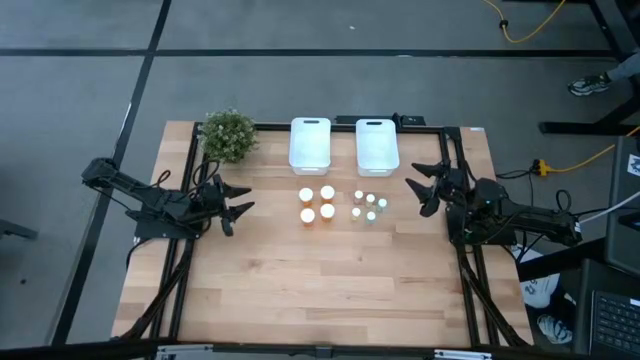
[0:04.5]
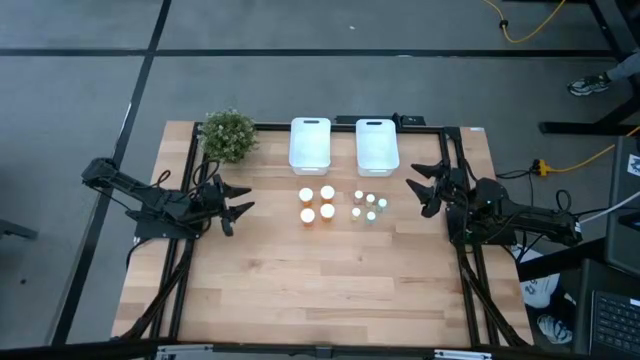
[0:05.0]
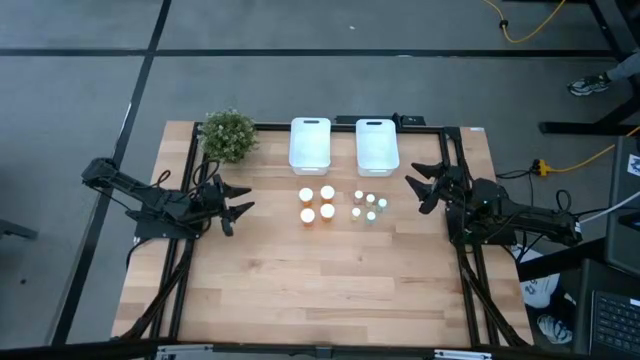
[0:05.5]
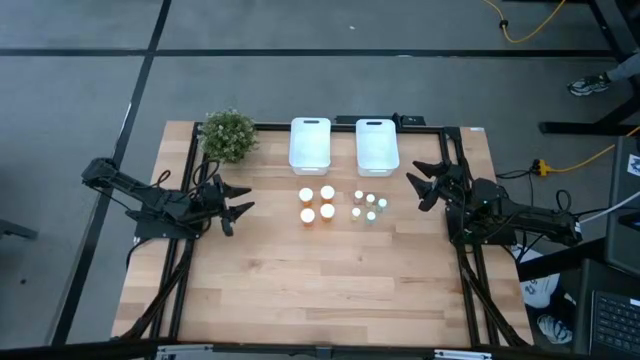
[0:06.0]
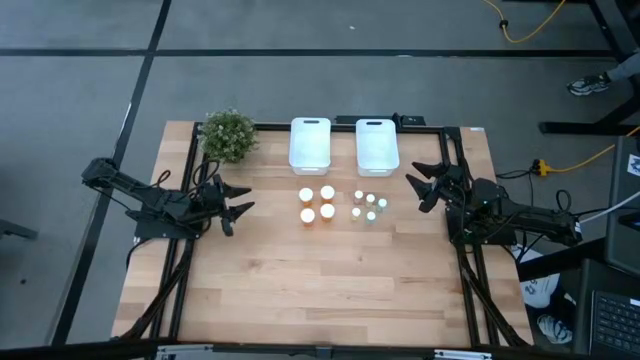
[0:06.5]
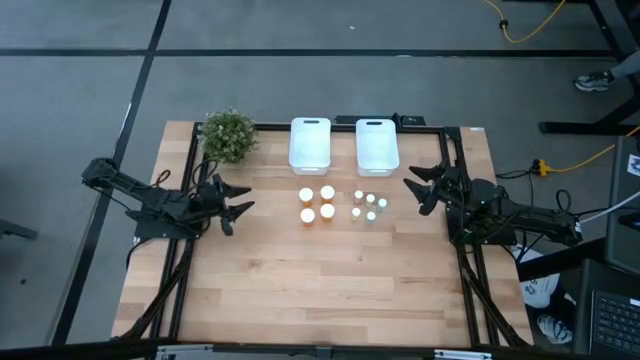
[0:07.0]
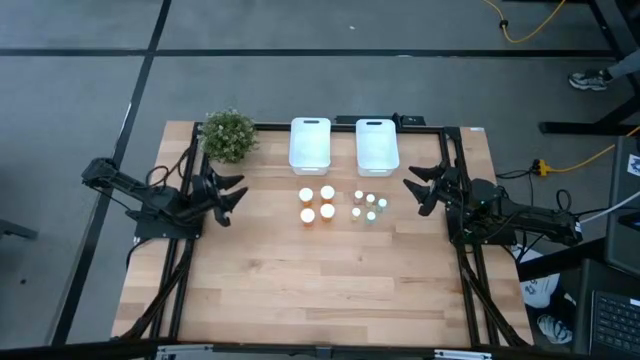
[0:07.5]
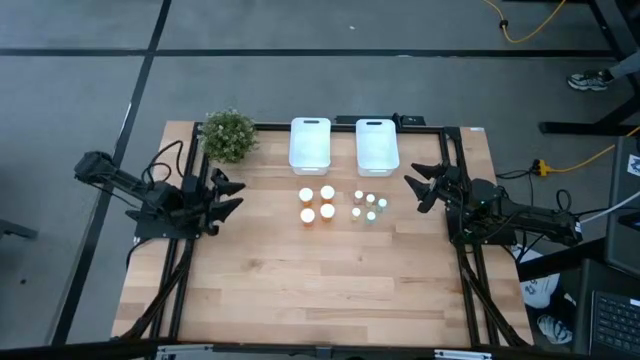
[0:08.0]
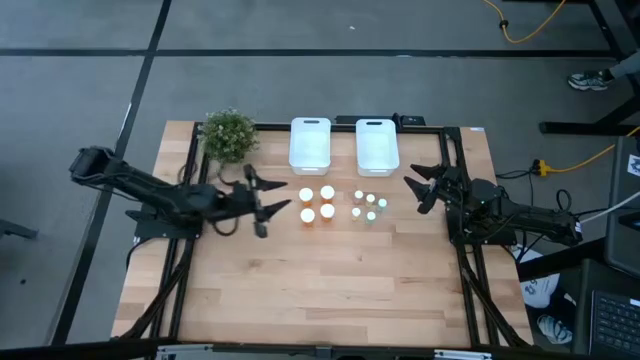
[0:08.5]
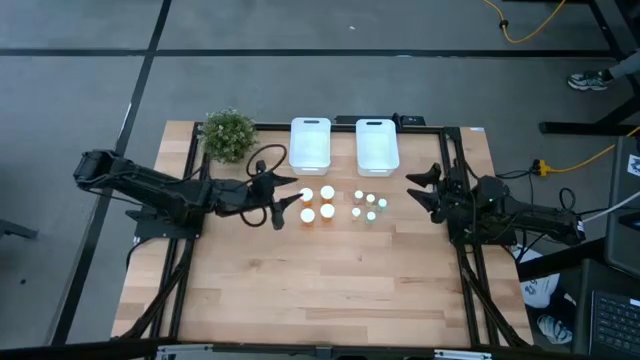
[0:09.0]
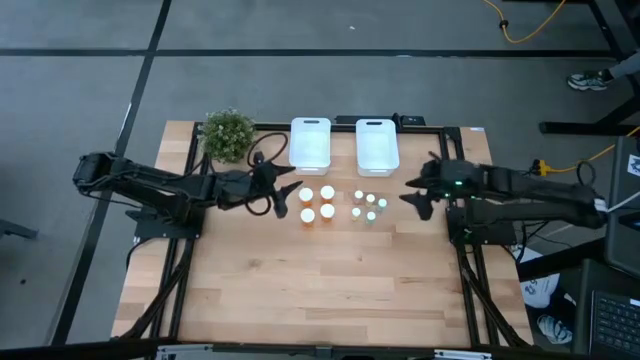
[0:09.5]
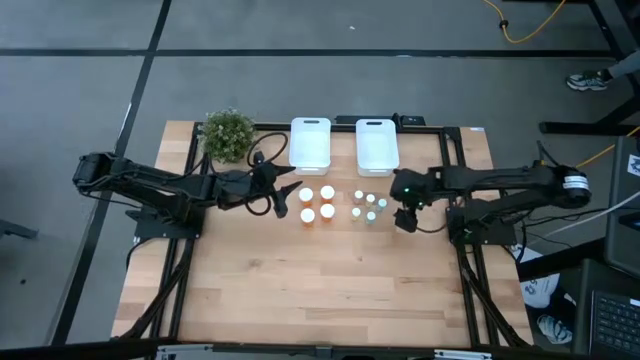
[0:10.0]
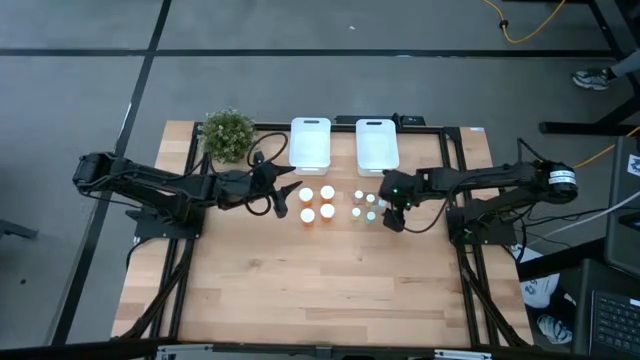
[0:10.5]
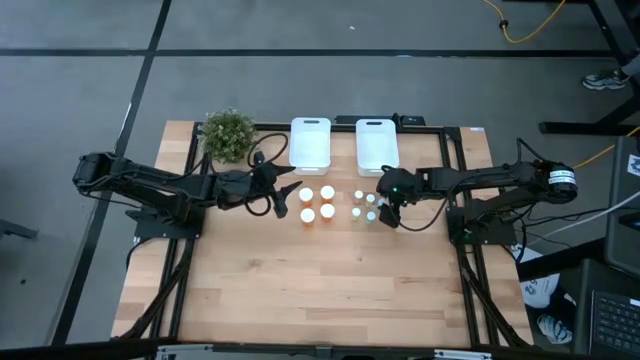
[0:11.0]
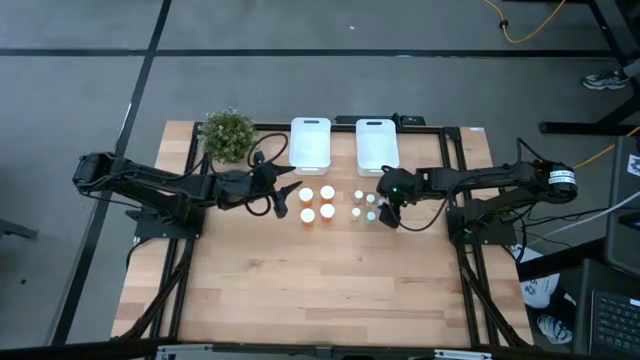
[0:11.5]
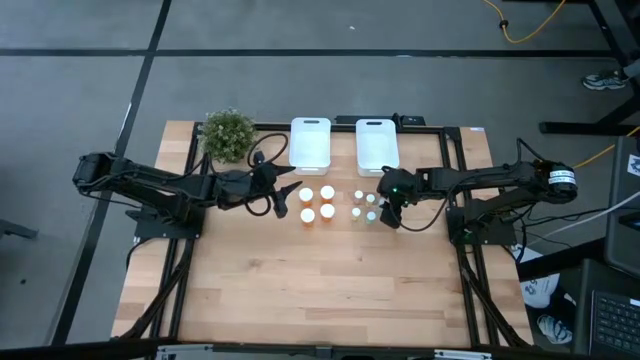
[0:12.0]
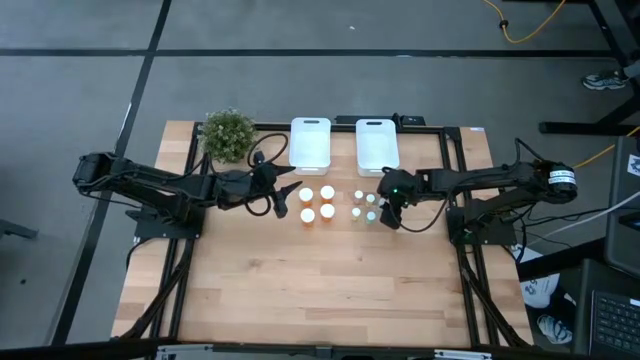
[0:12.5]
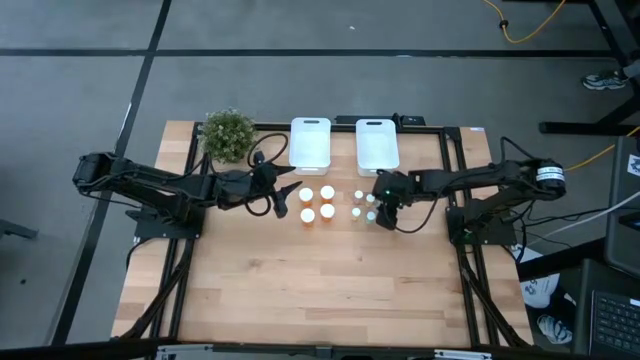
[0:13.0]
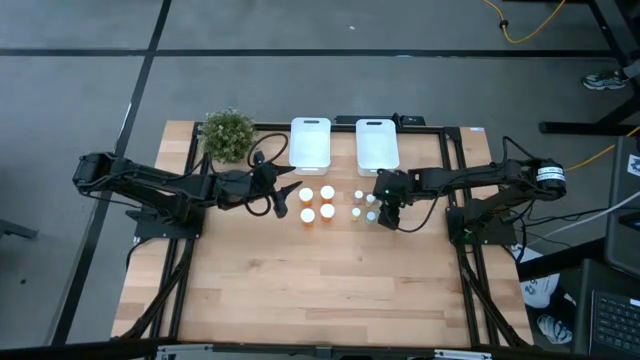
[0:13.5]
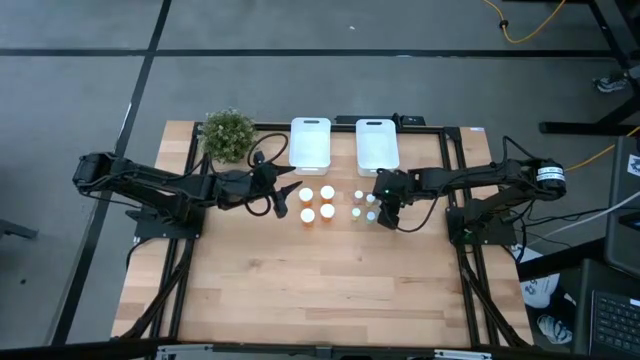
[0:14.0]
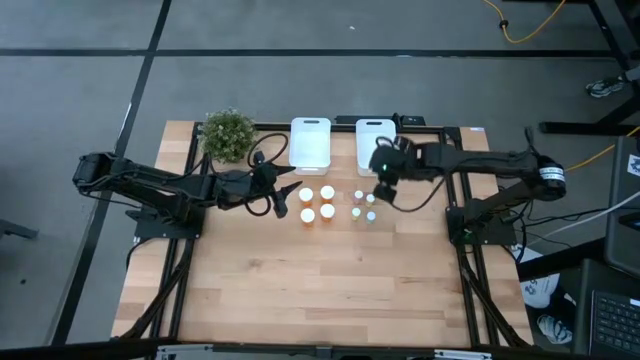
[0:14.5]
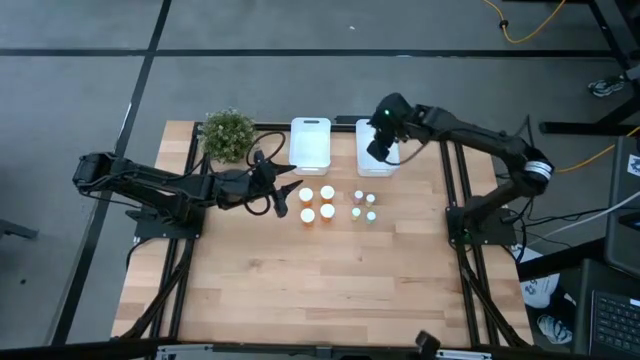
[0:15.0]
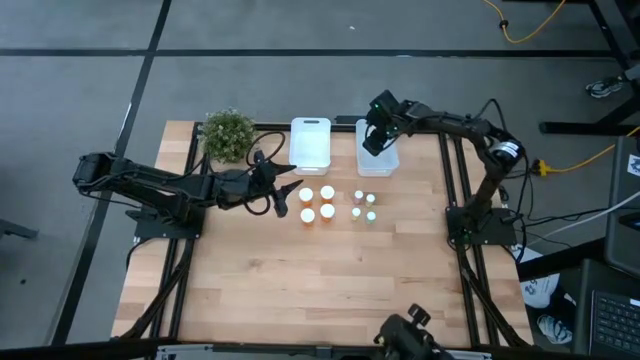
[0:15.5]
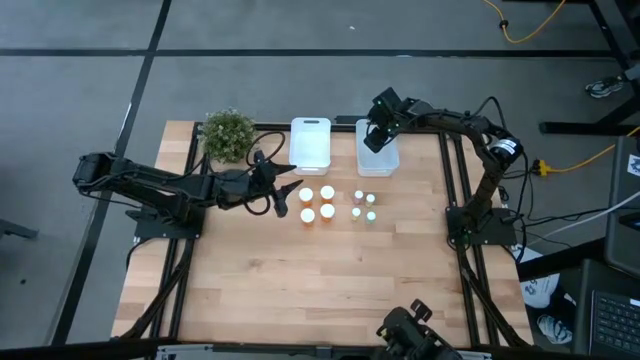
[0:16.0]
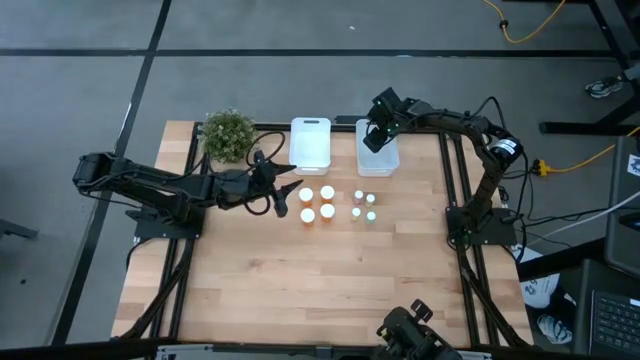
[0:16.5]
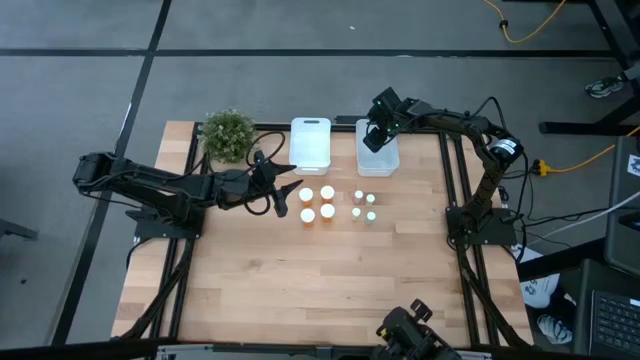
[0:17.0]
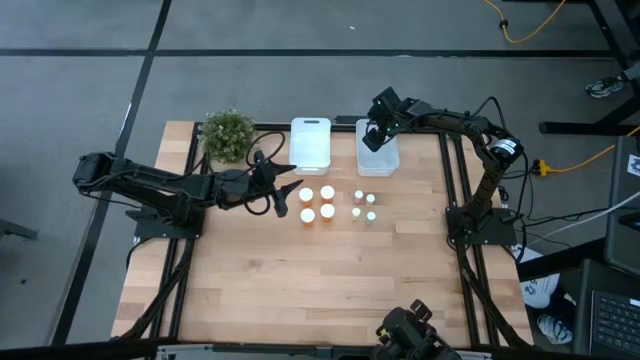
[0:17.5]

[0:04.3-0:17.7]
Task: Pick and place medicine bottles into bin by pill shape (circle, oval)
Put the blue pill bottle into the right white bin

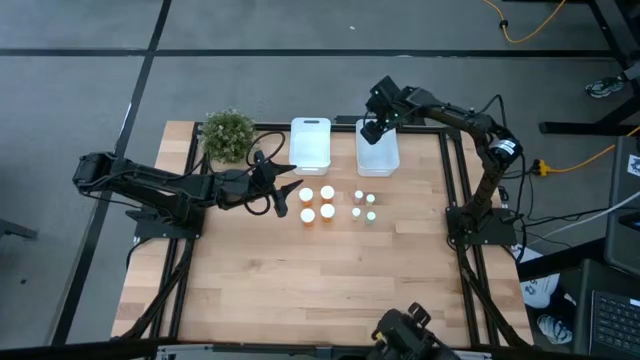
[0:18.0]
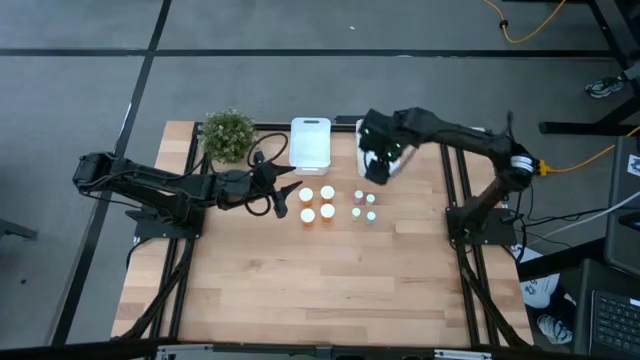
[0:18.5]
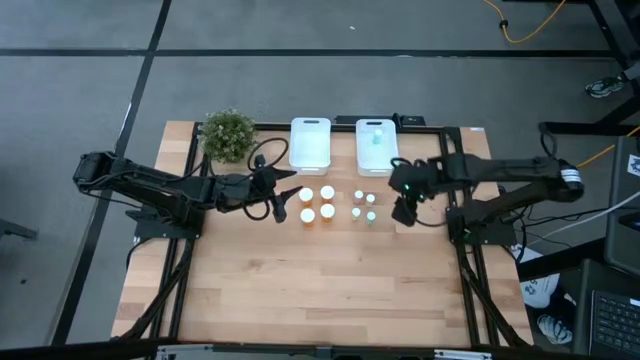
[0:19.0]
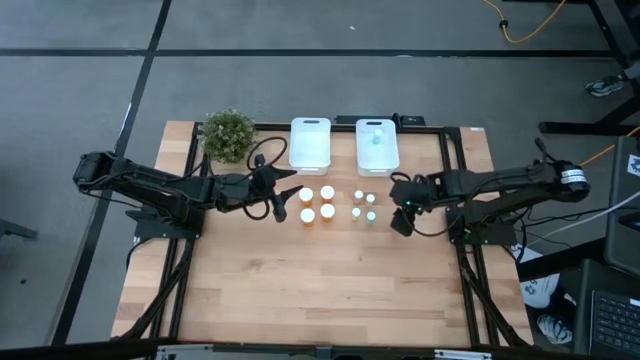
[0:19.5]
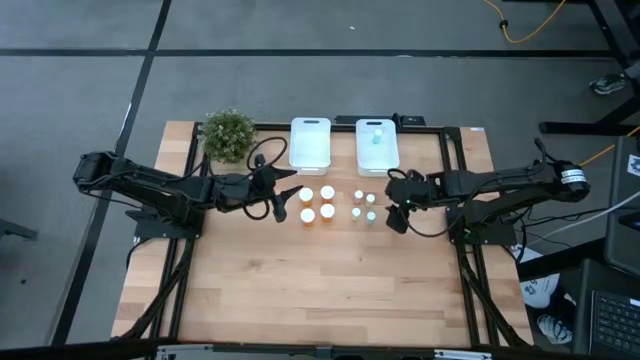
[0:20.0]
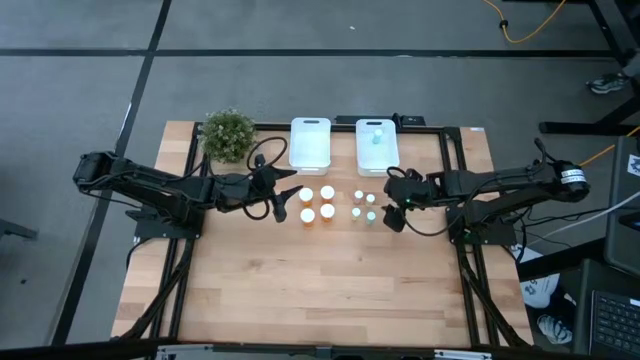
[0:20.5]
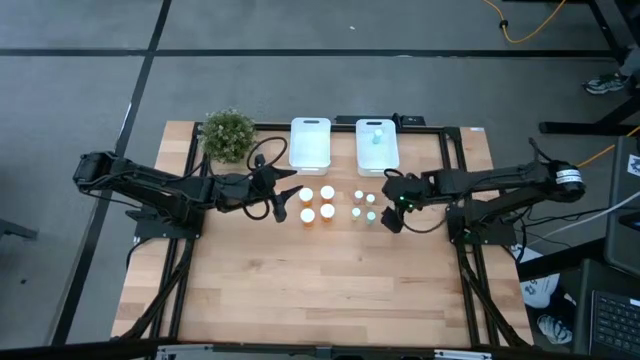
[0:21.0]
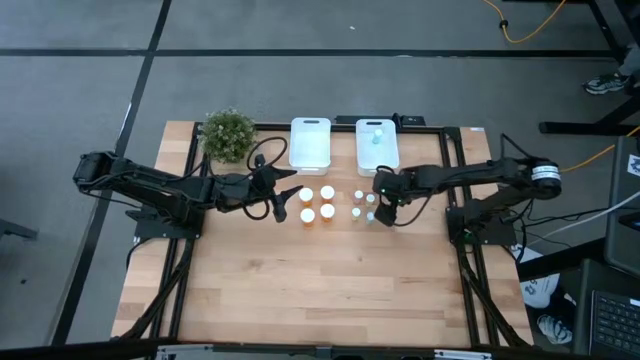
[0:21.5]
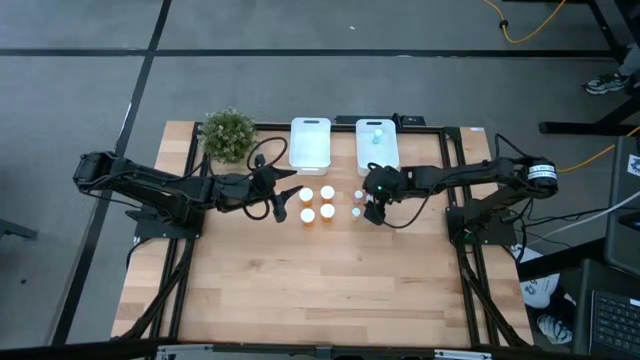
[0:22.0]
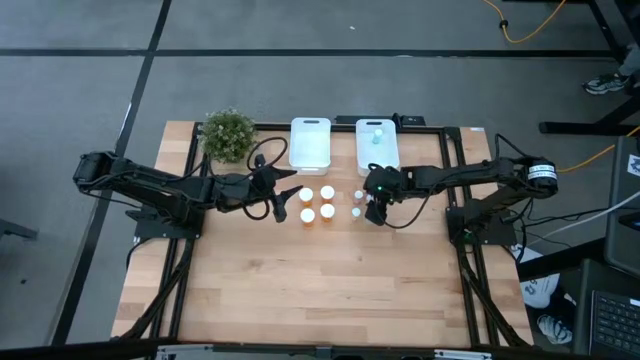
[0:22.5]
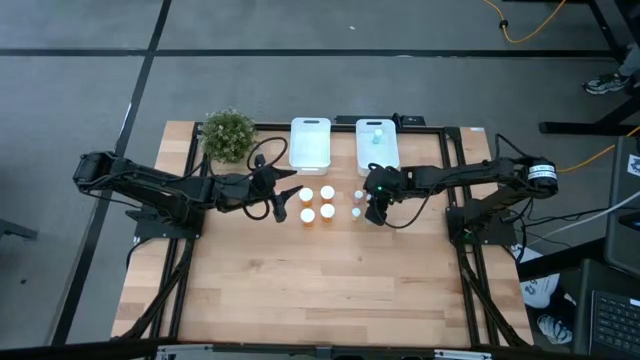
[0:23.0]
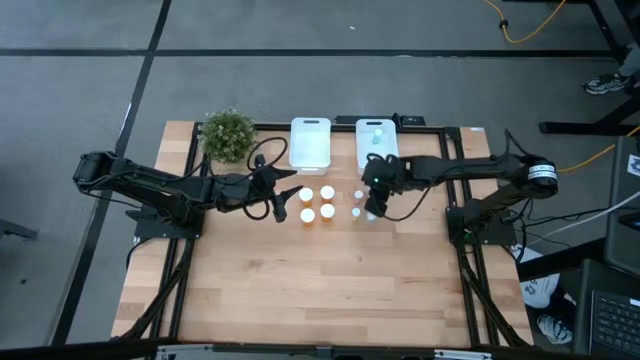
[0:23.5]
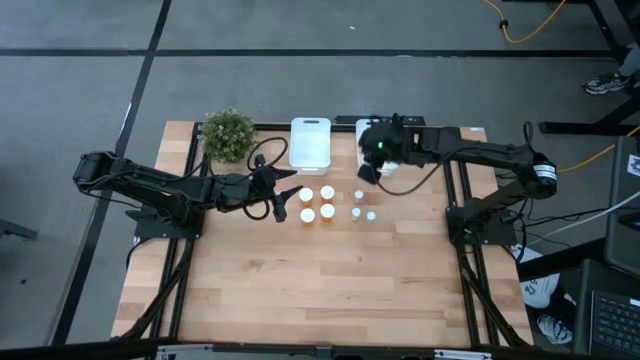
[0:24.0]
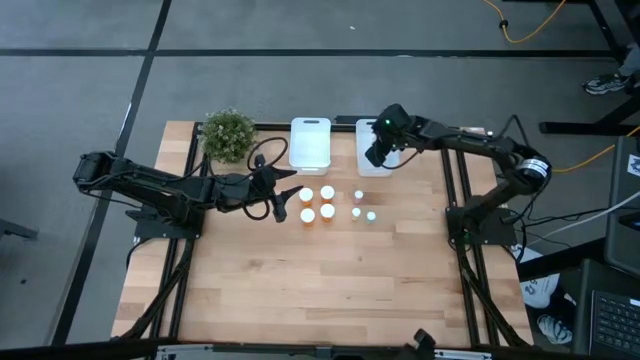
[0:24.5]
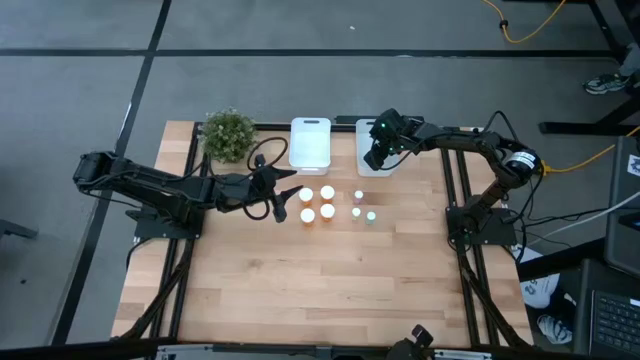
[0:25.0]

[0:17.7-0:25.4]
Put the yellow pill bottle into the right white bin
